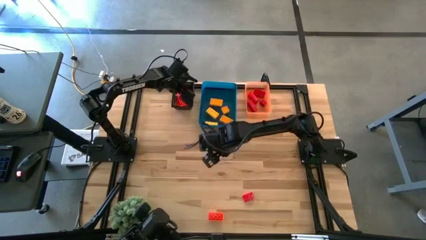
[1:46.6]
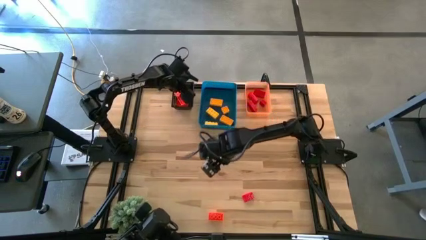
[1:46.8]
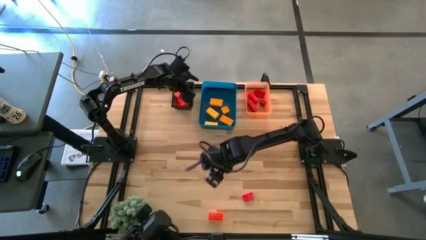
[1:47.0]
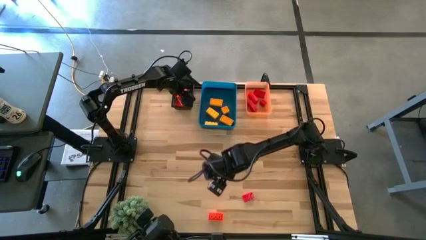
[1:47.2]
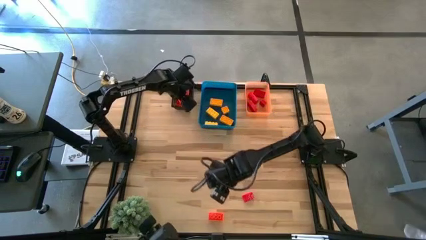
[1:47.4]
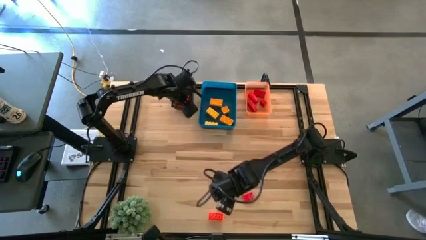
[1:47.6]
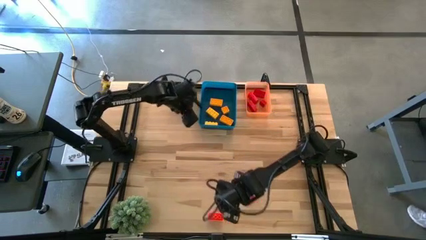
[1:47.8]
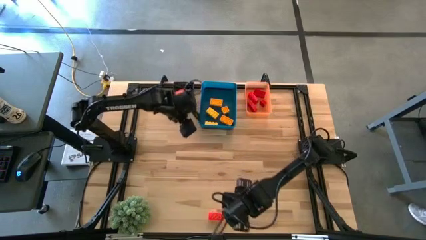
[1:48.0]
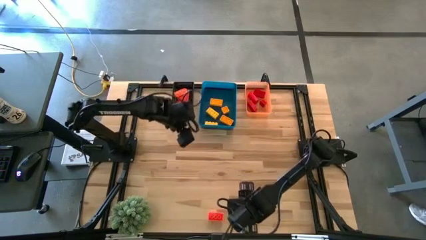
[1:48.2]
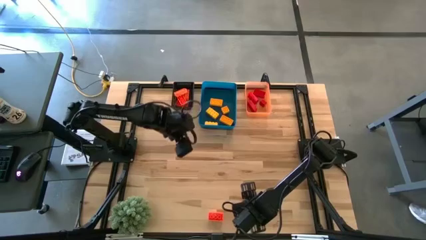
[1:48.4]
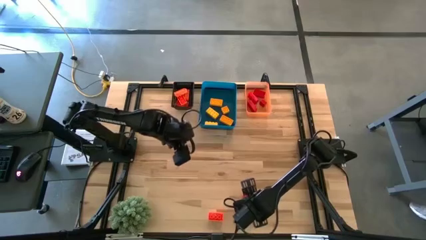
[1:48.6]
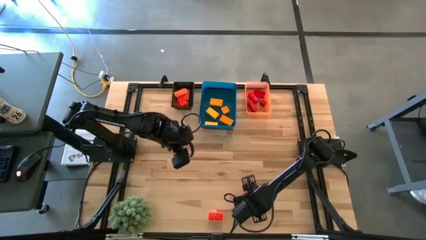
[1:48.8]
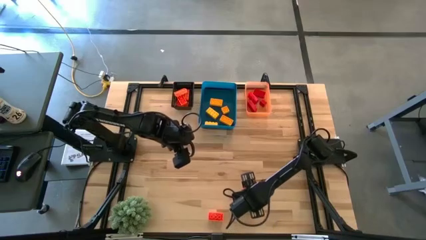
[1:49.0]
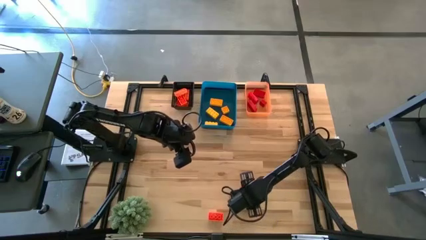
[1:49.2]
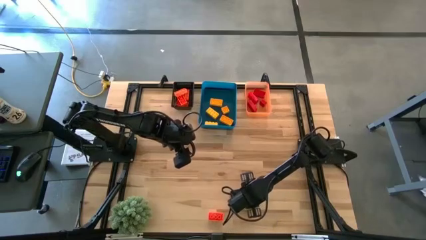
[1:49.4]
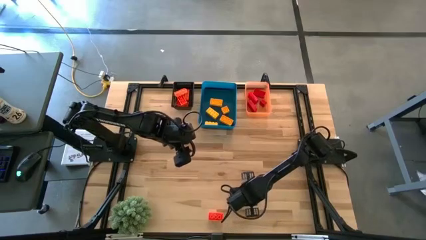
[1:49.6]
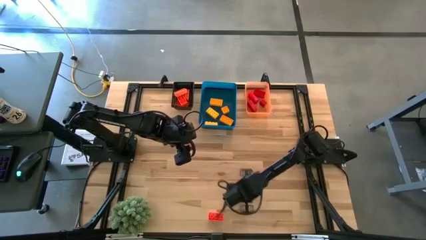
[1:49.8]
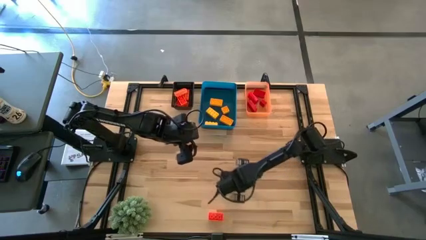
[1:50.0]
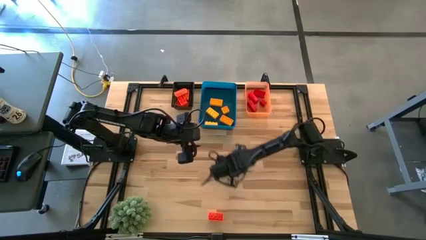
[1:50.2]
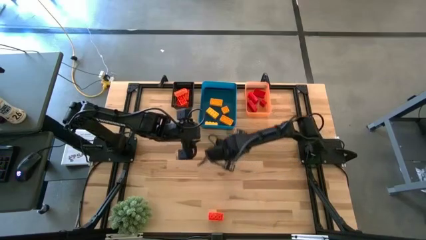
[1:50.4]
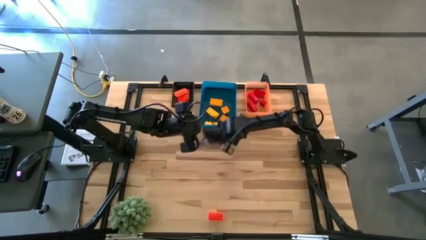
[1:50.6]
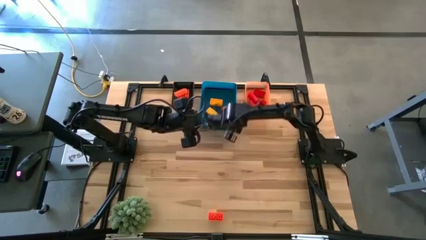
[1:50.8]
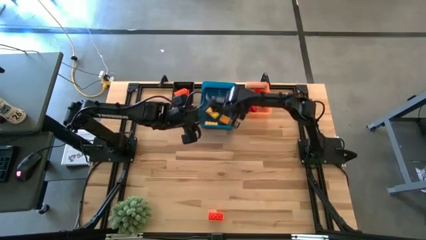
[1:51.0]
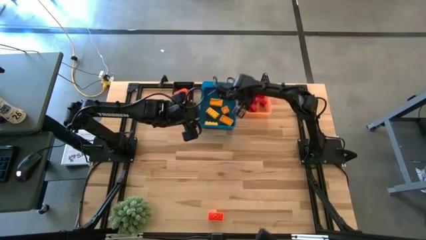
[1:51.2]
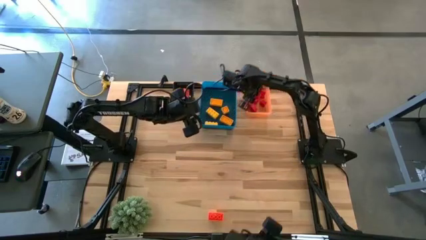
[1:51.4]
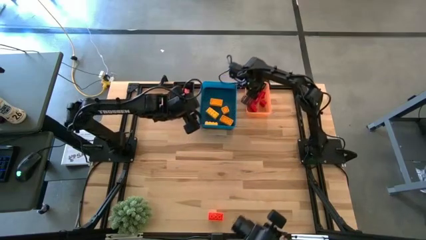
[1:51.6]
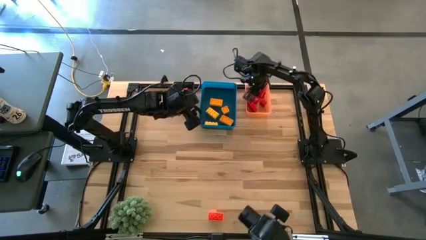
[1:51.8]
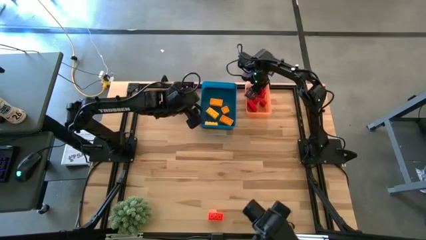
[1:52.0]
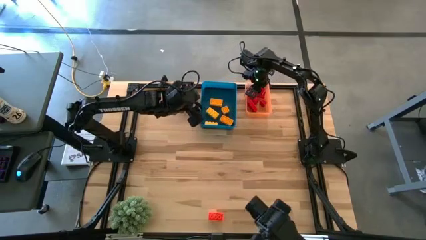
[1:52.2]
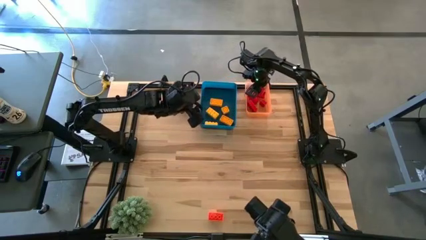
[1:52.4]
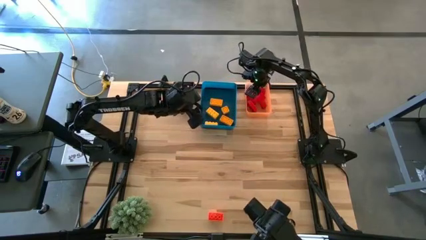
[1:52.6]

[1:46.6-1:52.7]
Task: Sort & place blocks by color
Put the red game piece into the orange bin

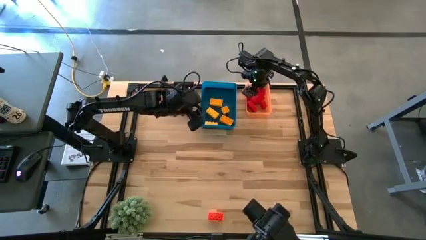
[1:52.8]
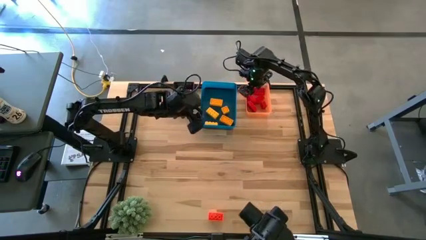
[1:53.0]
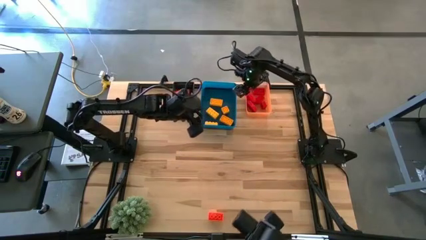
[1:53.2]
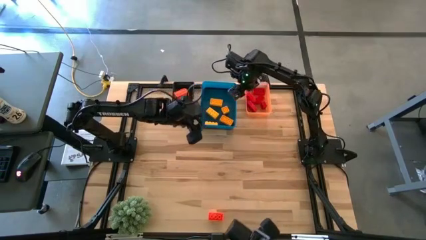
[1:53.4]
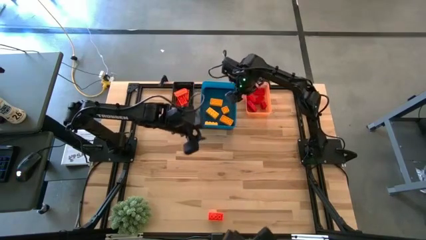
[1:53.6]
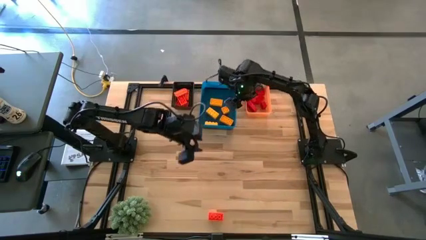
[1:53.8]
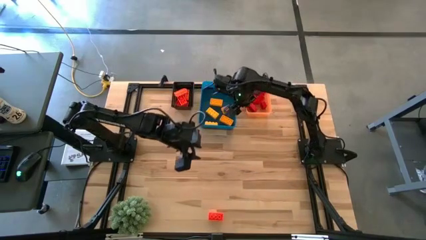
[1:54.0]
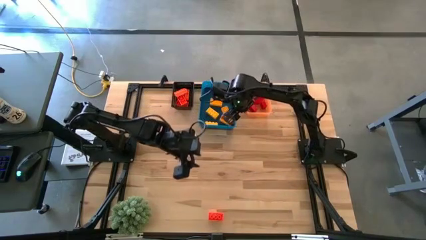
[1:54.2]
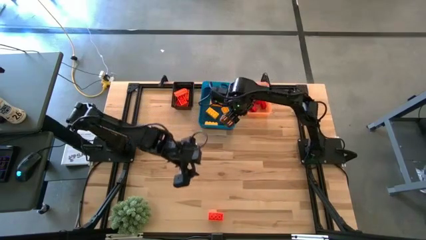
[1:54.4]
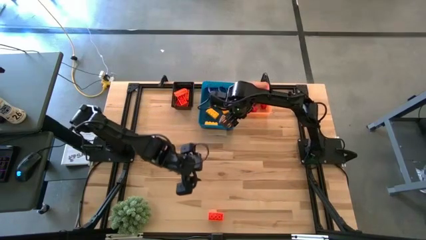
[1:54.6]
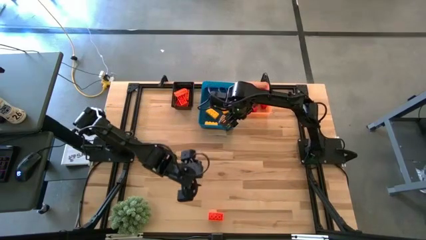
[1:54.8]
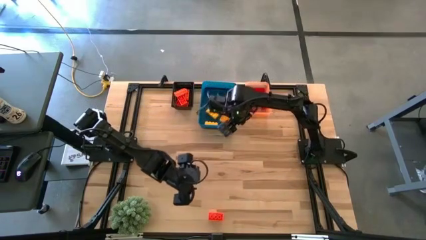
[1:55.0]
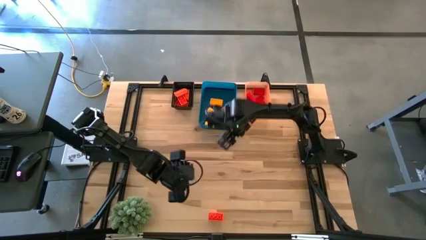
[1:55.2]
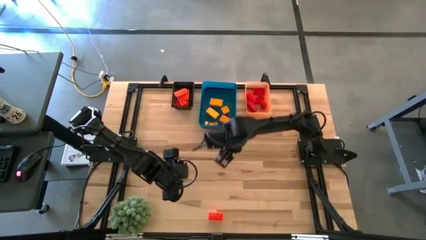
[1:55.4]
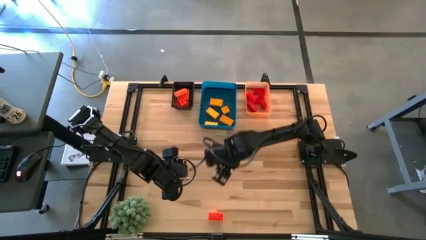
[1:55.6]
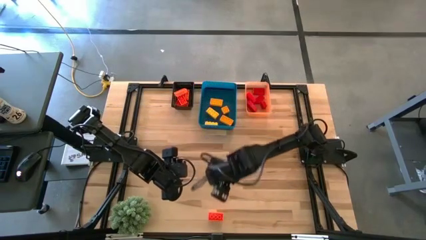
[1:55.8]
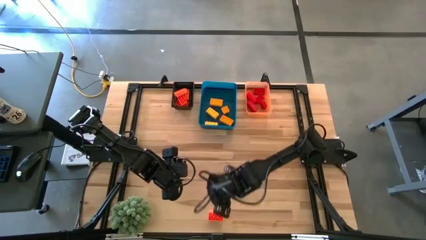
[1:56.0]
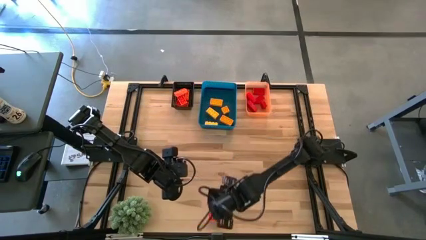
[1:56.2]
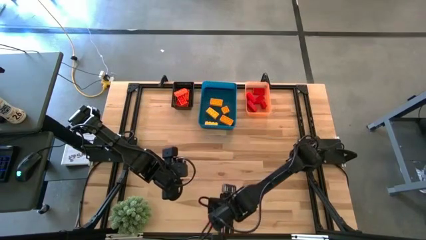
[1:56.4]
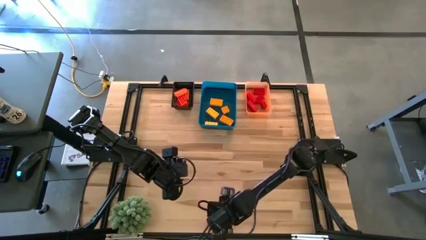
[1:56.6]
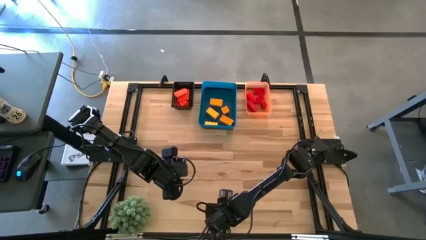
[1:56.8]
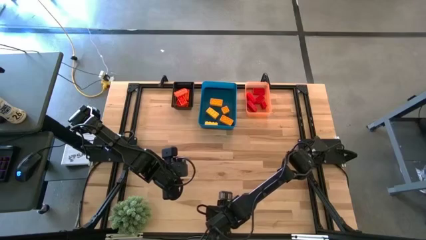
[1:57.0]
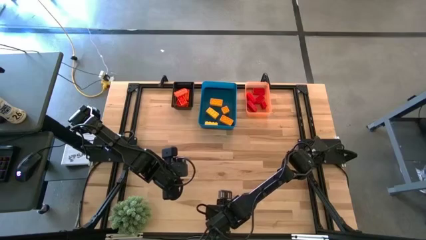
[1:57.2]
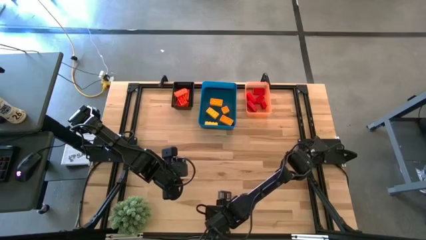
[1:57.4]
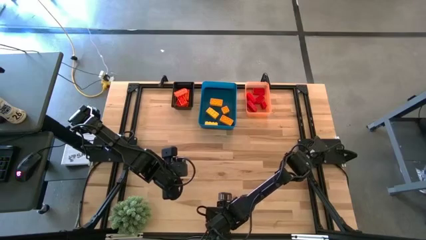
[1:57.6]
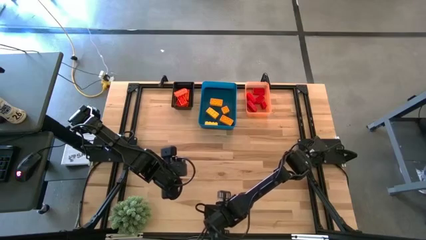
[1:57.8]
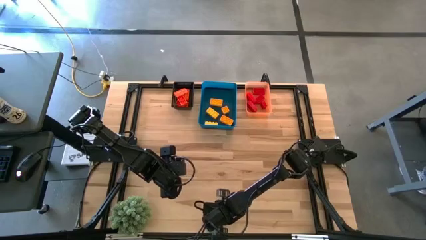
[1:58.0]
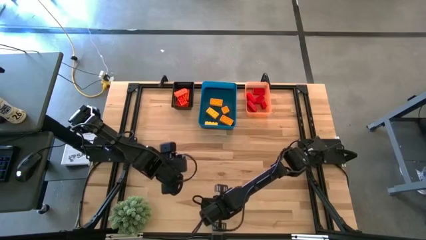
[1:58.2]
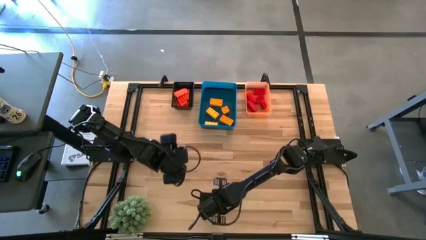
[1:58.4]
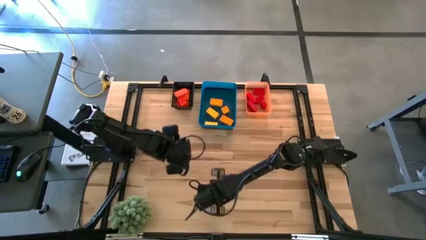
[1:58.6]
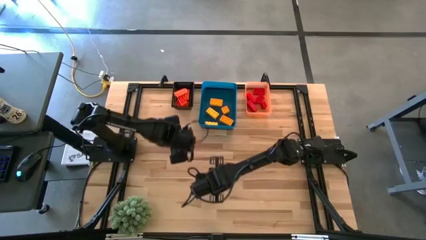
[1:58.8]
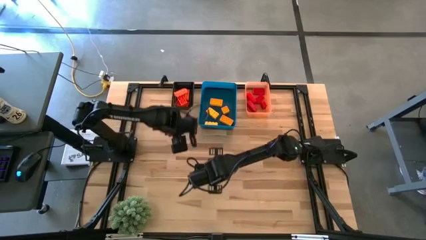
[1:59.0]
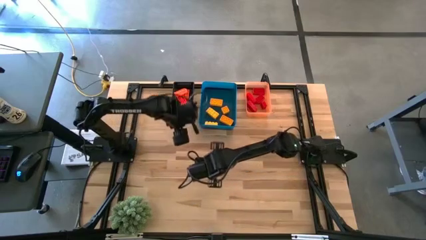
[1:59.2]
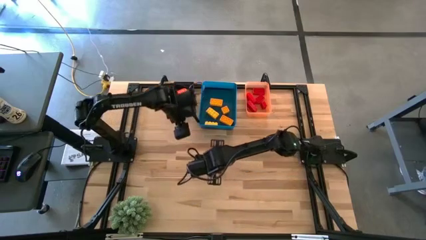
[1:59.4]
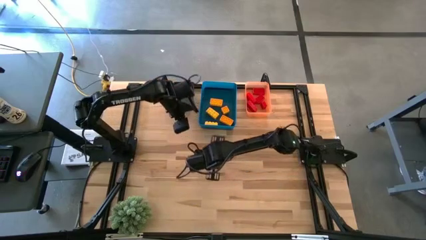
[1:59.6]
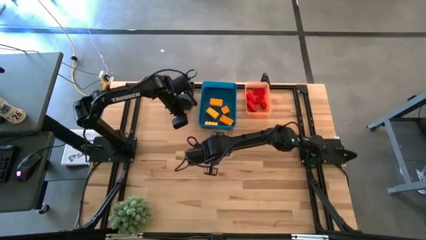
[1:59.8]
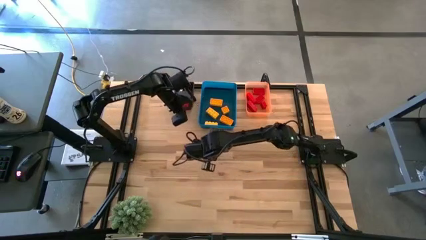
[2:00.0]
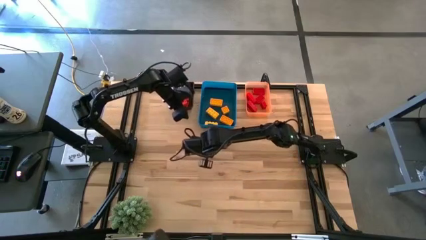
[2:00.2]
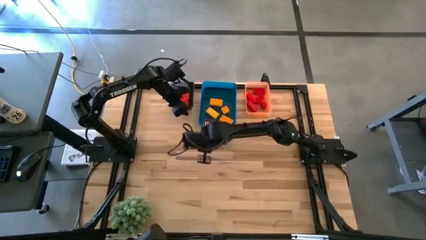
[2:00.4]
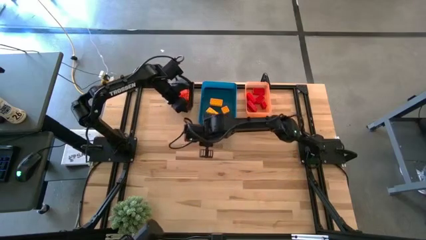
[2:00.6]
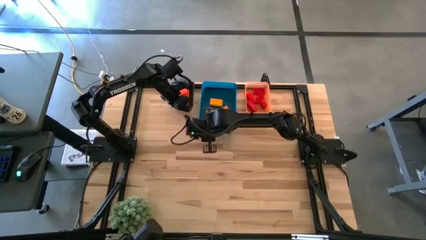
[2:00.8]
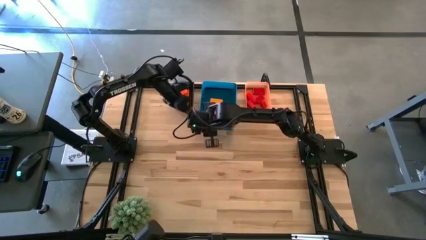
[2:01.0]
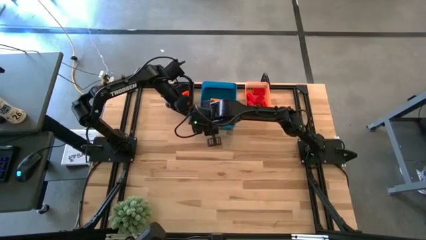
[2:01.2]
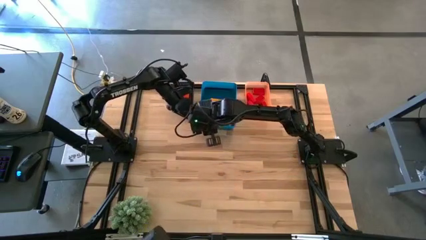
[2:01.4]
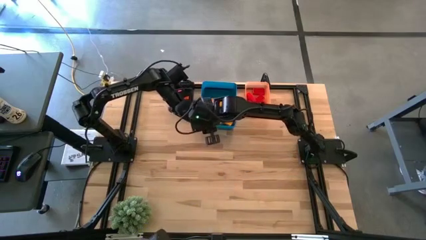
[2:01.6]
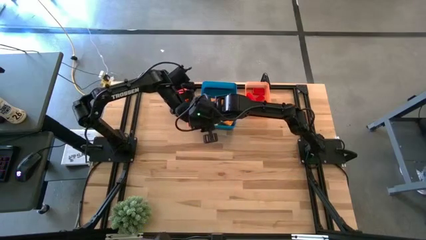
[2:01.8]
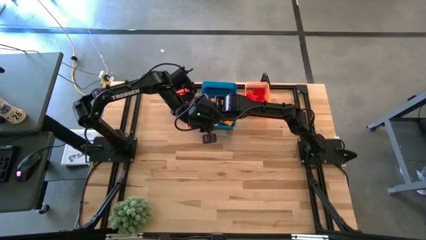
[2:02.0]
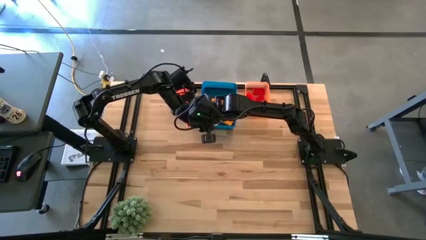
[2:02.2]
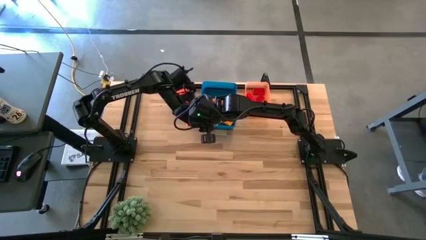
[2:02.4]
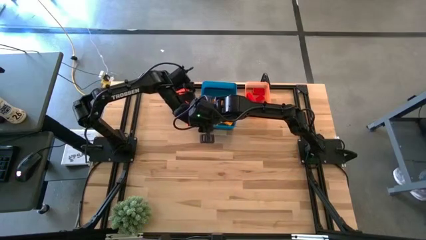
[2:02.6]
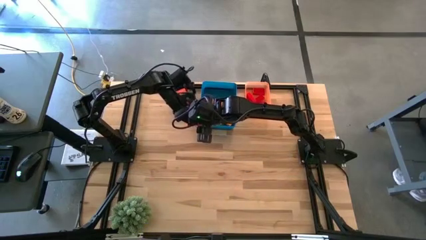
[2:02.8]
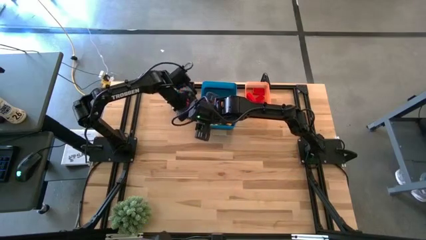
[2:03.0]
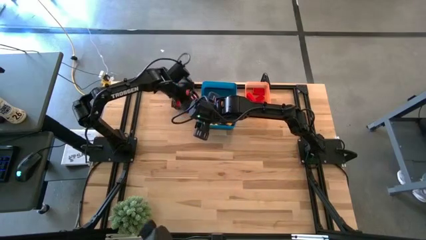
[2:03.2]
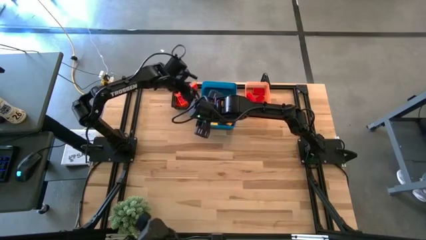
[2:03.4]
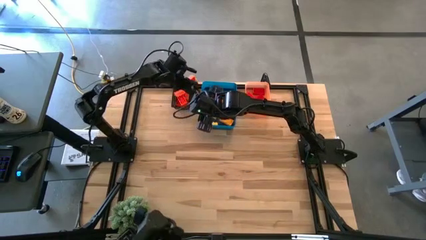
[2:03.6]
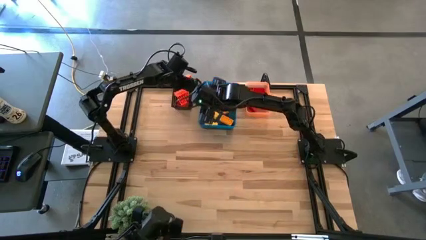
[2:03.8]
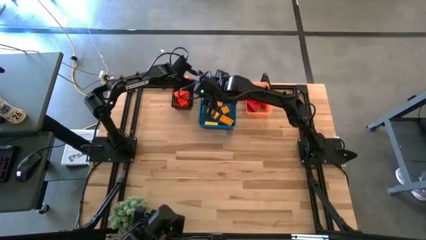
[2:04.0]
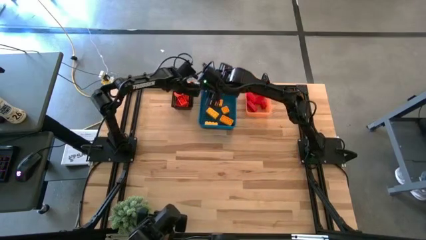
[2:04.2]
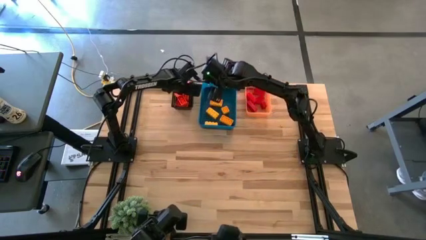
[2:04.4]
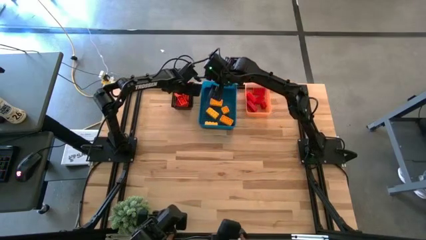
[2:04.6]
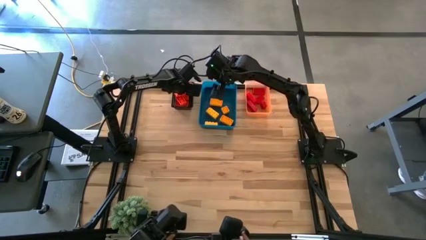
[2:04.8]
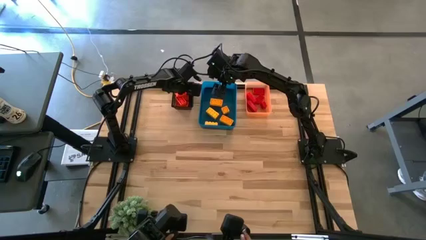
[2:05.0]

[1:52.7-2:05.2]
Put the orange game piece into the black bin
